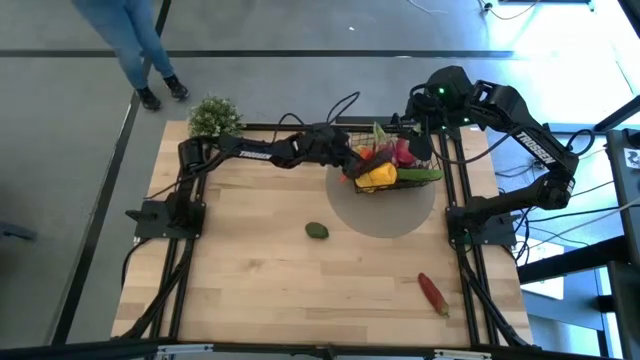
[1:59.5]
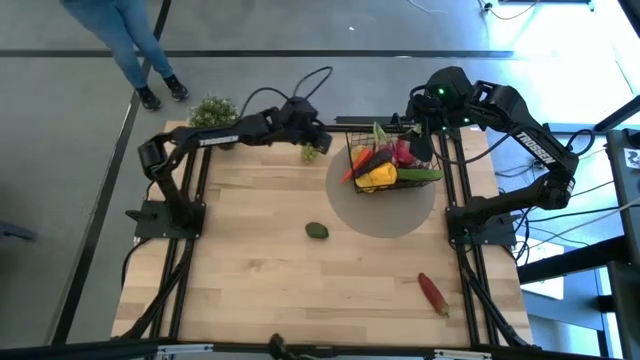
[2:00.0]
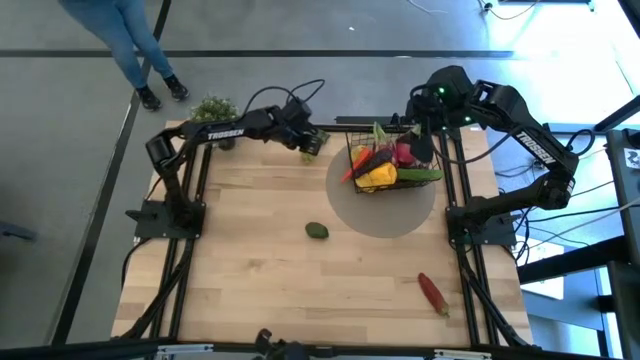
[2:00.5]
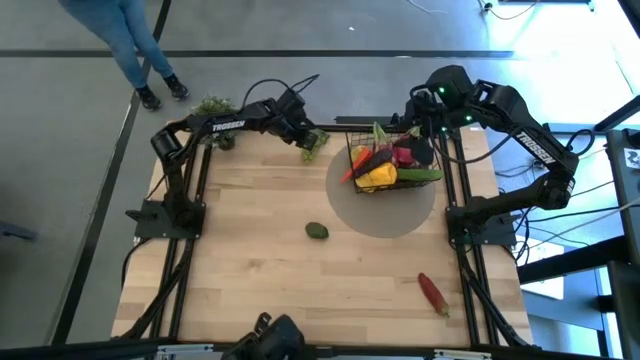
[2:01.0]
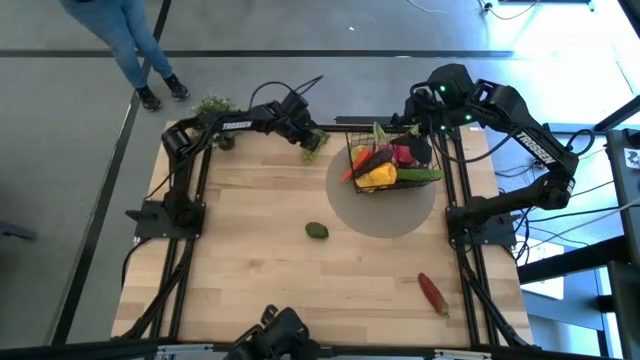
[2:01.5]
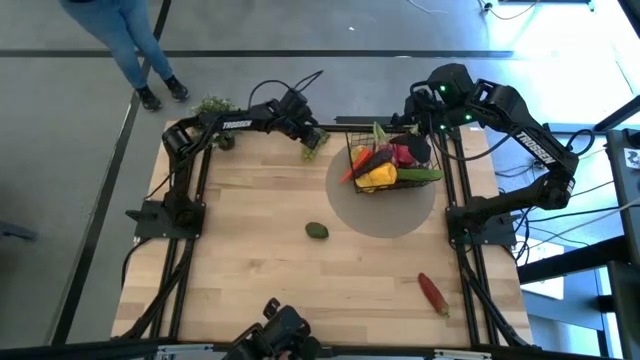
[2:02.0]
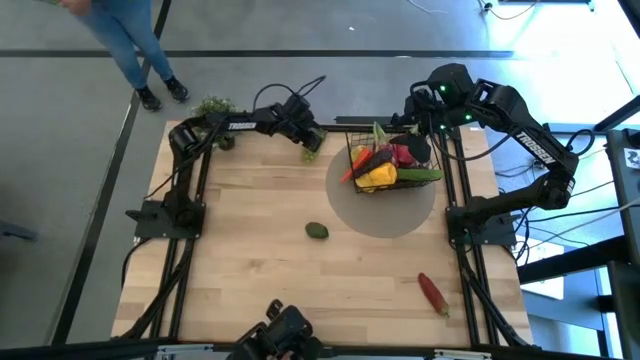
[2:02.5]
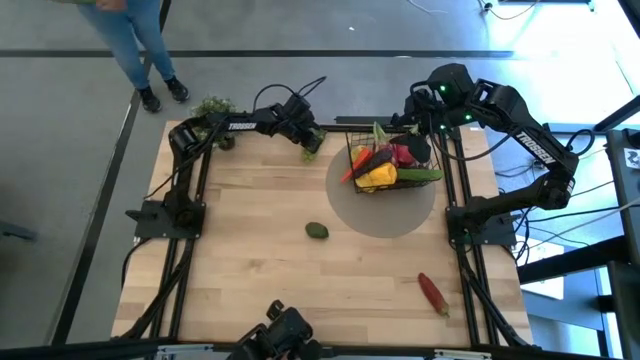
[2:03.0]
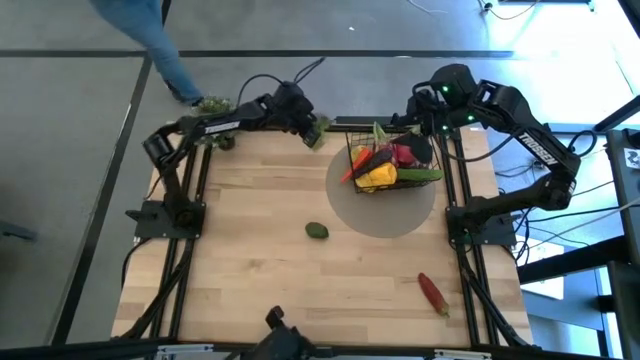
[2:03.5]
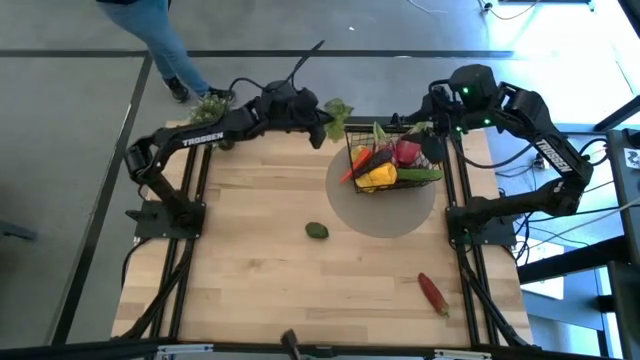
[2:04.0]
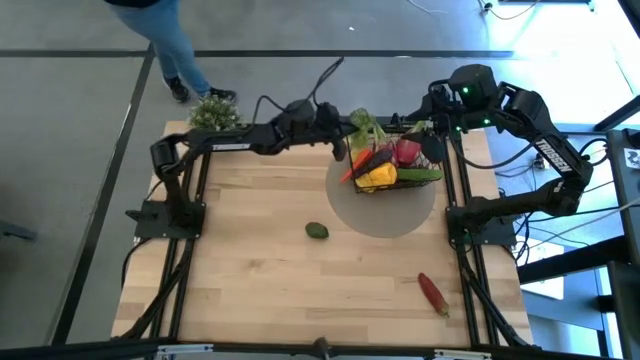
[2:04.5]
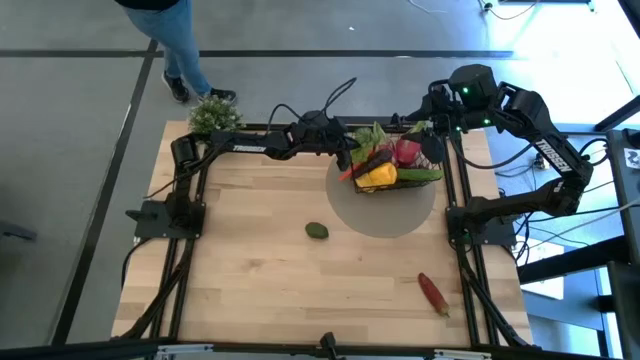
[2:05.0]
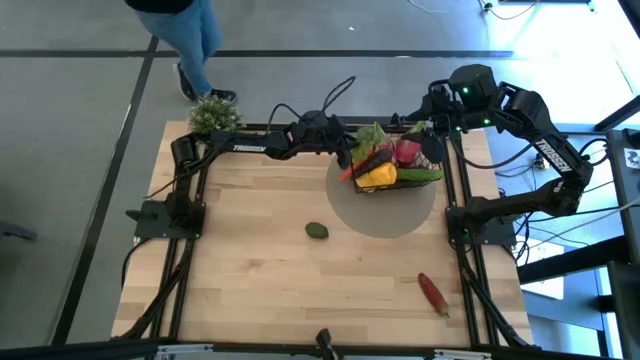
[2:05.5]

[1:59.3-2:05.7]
Task: Build produce basket
Put the green grapes into the wire basket

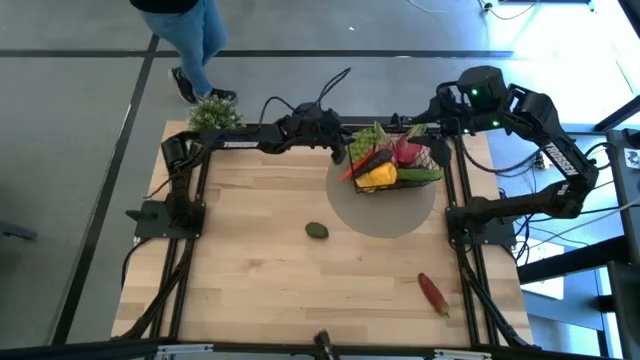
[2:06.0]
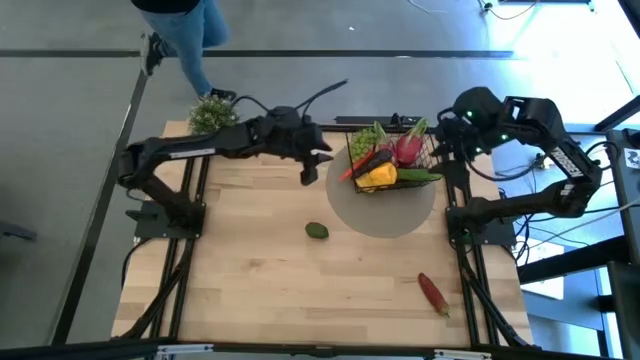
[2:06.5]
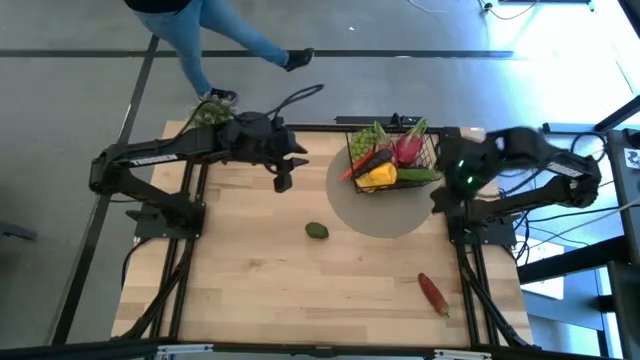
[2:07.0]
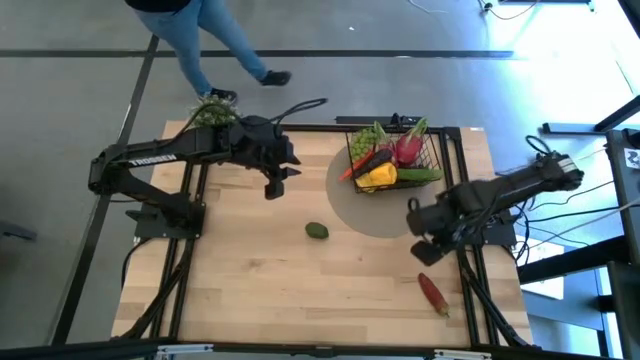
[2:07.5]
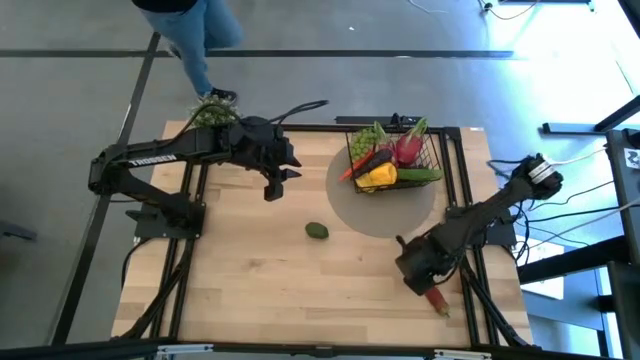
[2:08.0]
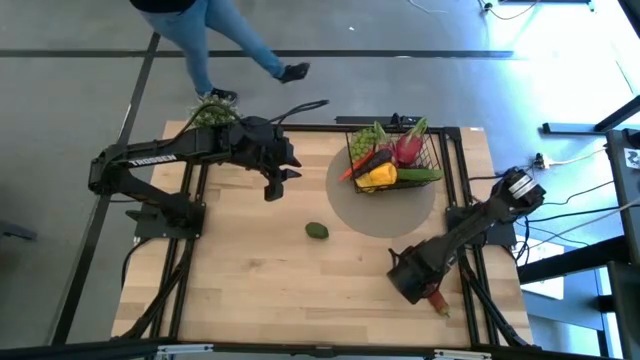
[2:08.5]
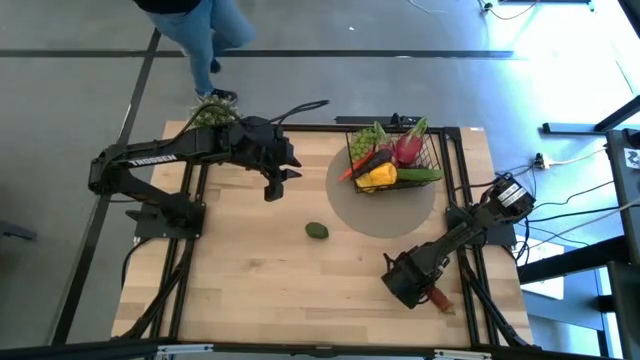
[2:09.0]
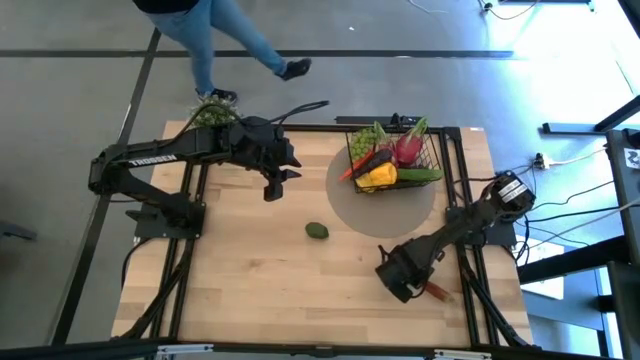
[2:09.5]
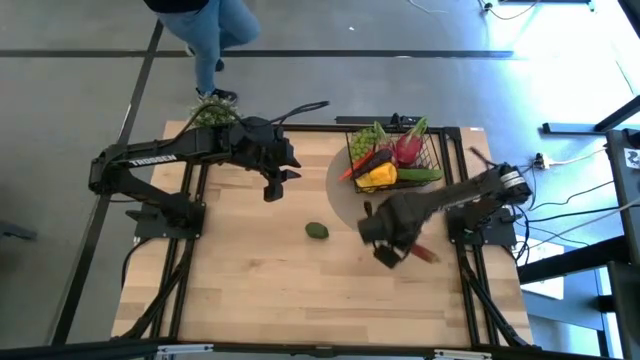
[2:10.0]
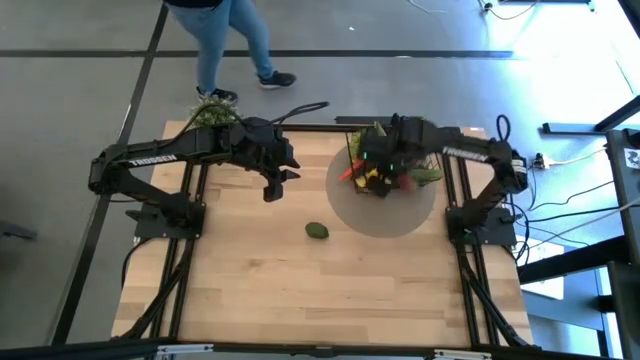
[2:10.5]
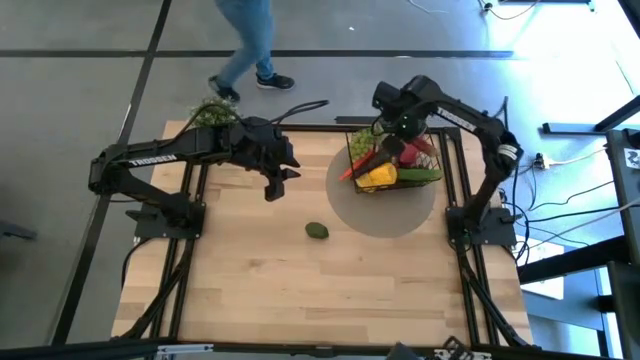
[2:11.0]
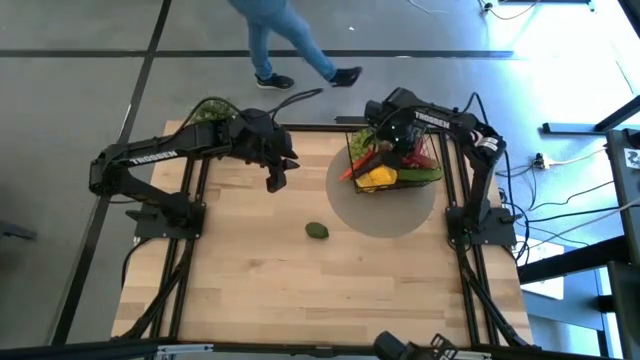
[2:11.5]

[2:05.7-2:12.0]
Put the red chili pepper into the wire basket

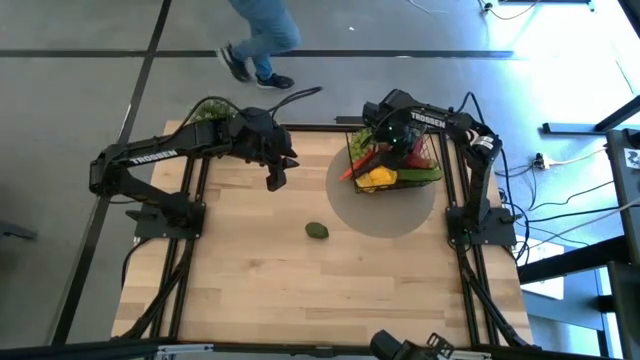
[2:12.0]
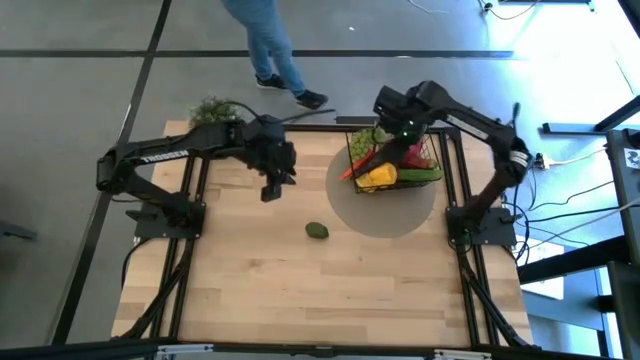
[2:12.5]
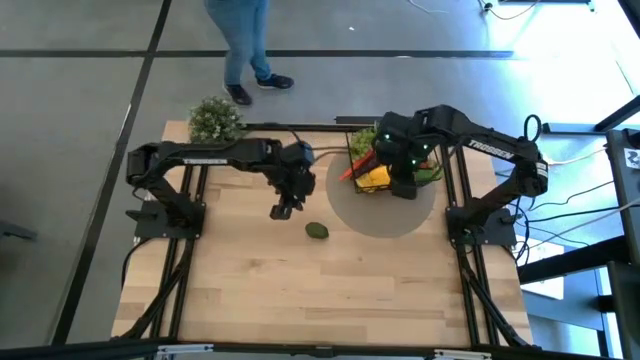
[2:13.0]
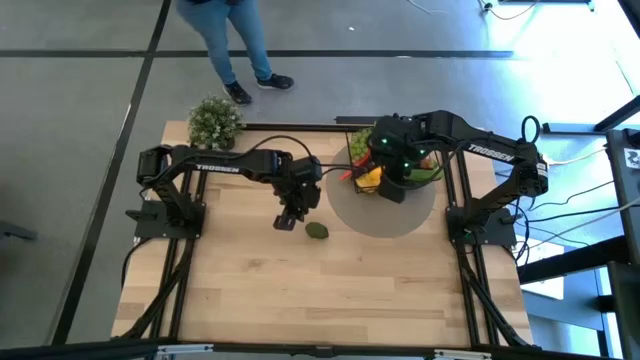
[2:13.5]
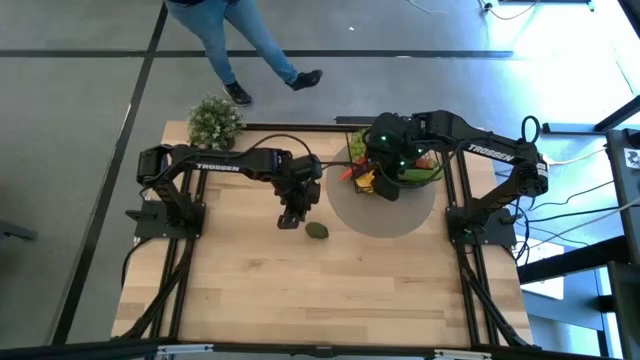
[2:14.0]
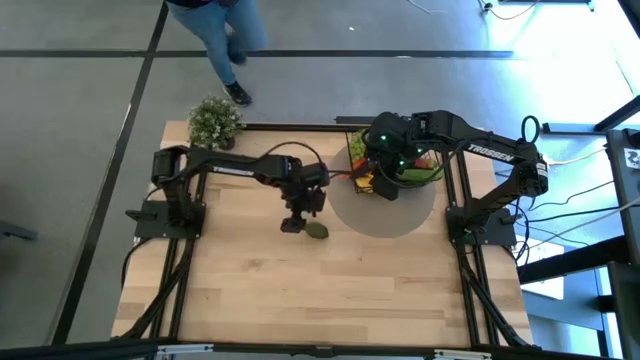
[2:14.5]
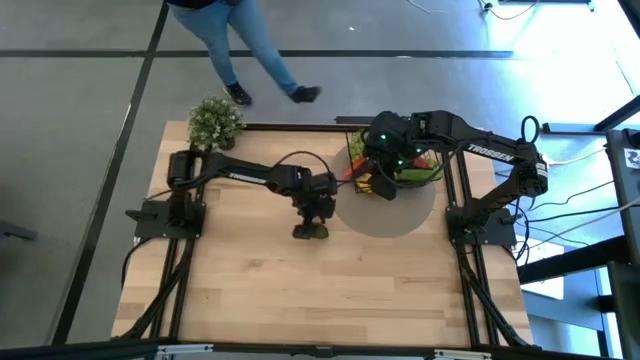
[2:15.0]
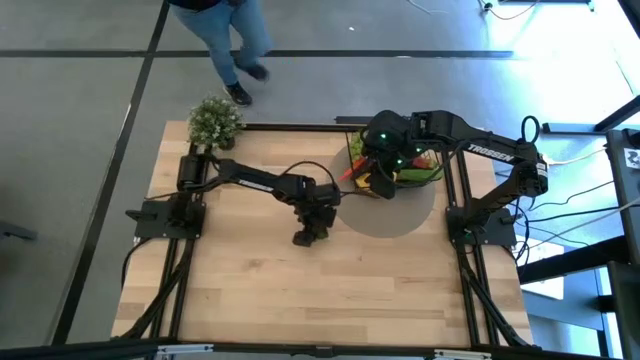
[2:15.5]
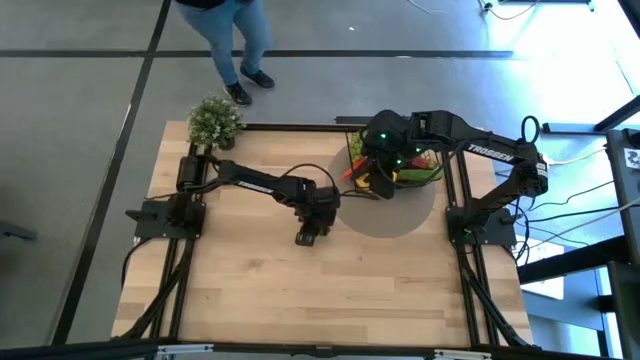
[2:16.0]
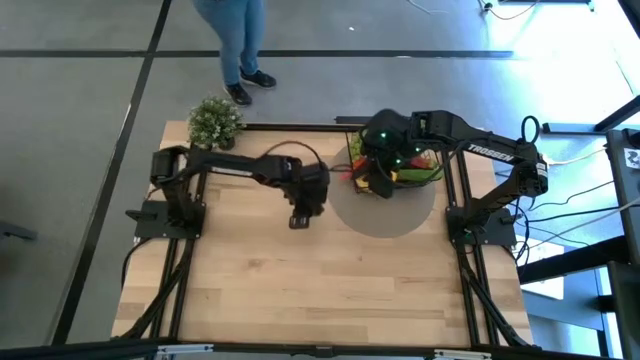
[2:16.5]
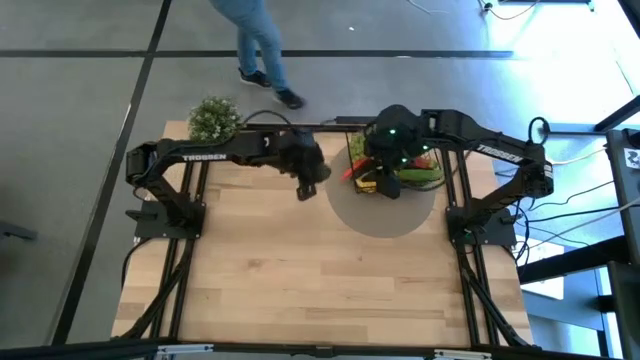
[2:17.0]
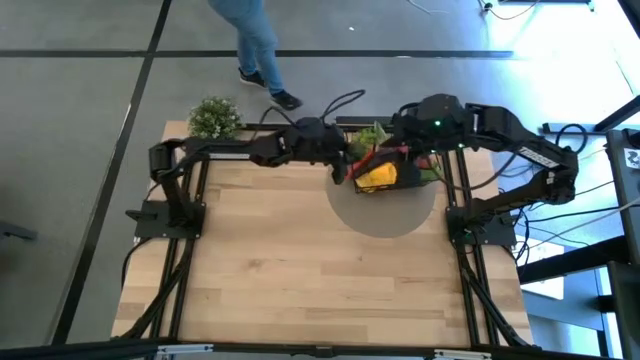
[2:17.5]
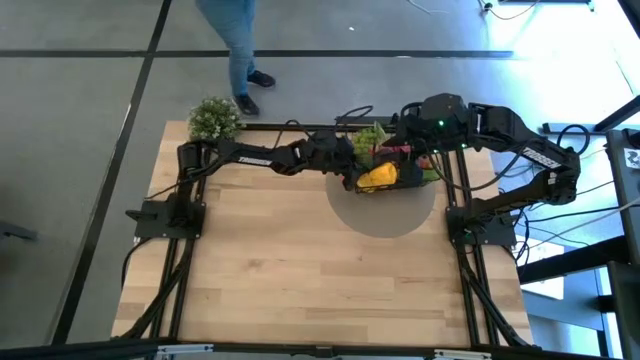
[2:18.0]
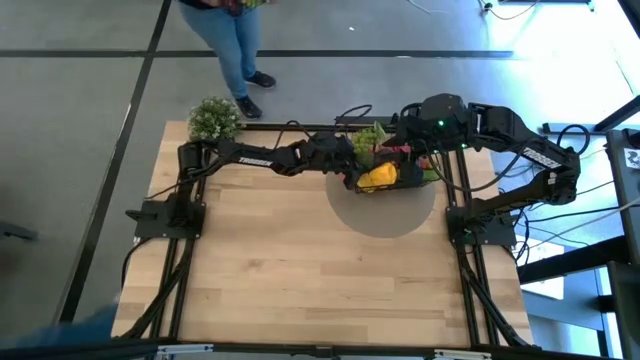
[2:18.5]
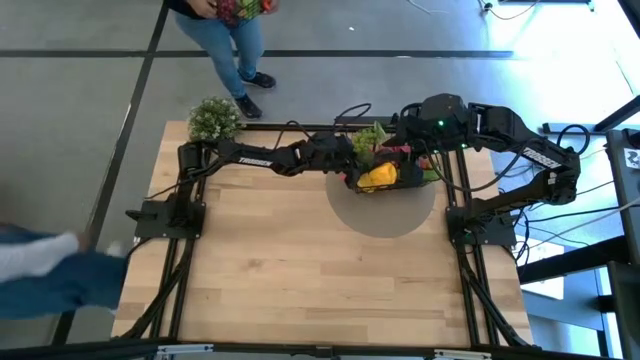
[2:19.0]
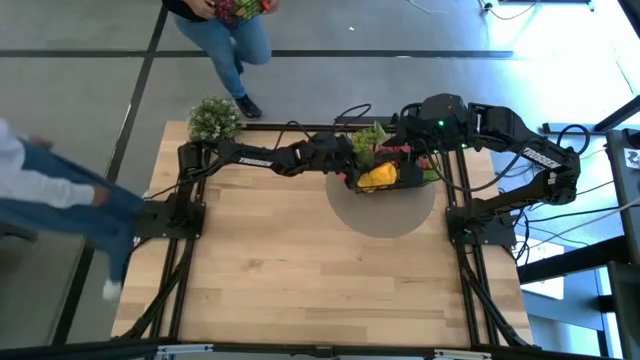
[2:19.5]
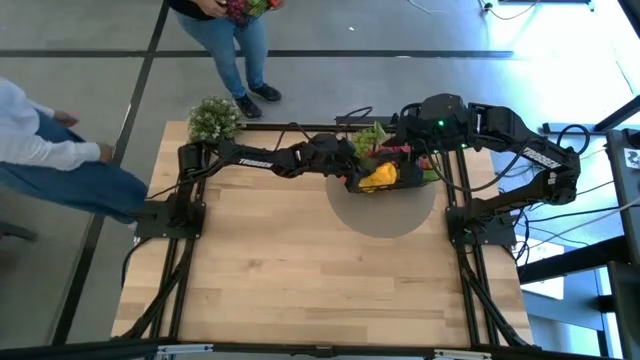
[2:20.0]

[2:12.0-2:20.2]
Put the lime into the basket

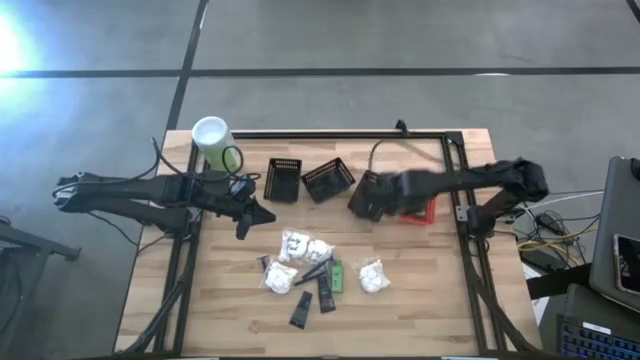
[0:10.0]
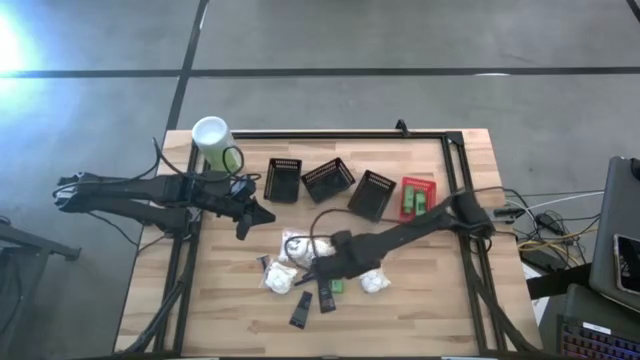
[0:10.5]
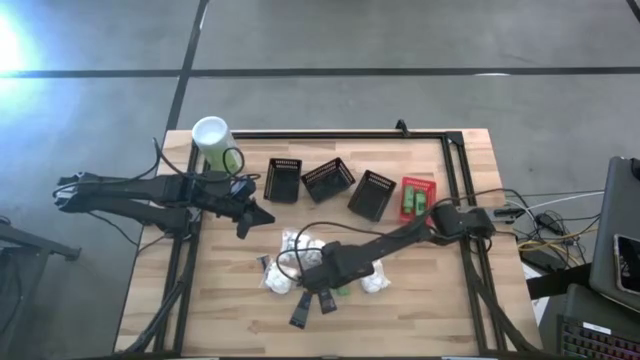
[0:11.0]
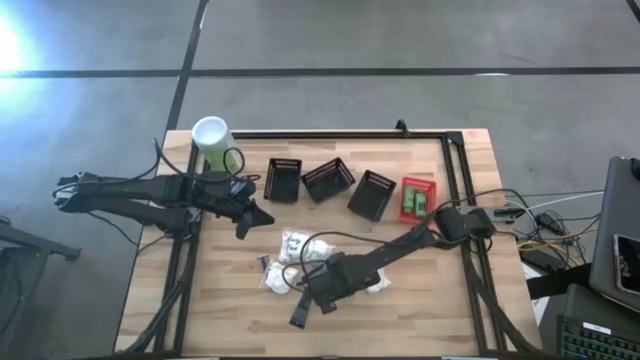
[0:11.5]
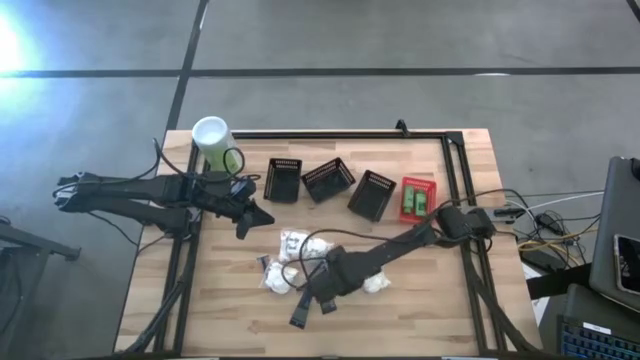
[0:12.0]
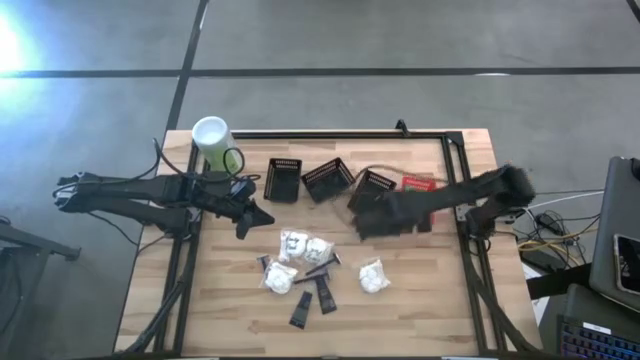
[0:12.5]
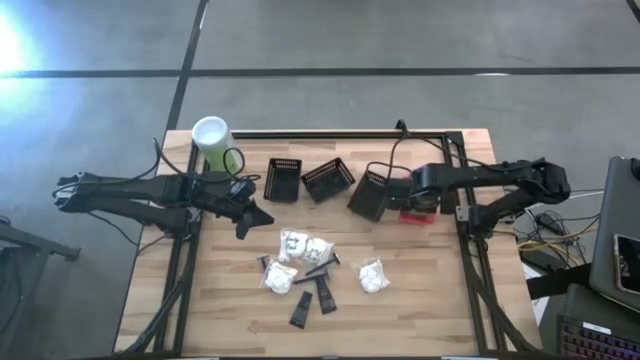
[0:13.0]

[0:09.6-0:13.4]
Task: Pick & Place Travel size toiletries
Put the shampoo into the red bin
